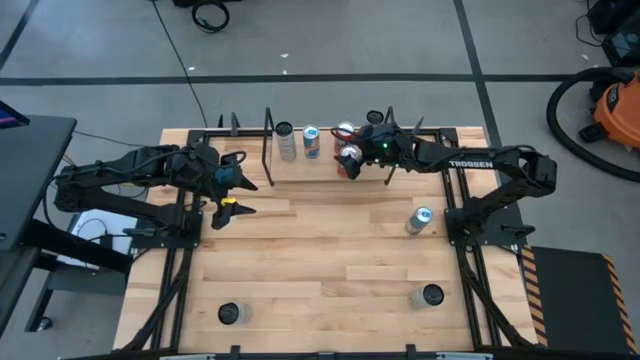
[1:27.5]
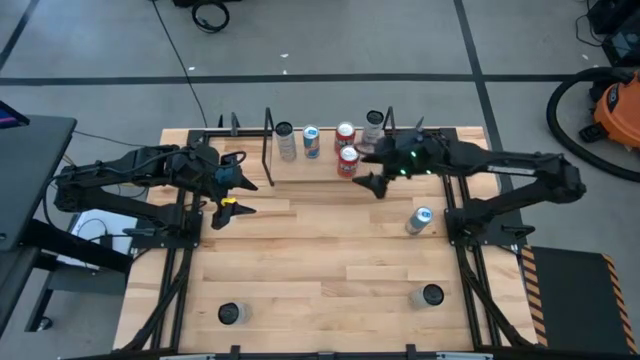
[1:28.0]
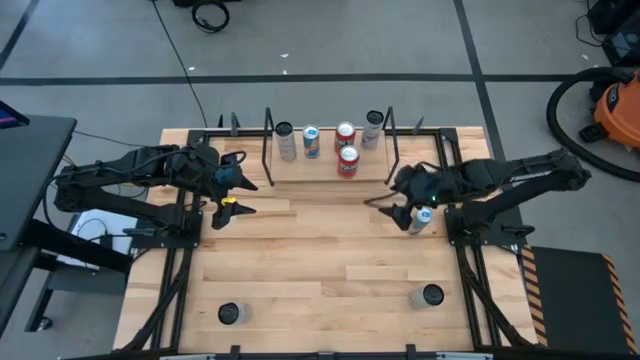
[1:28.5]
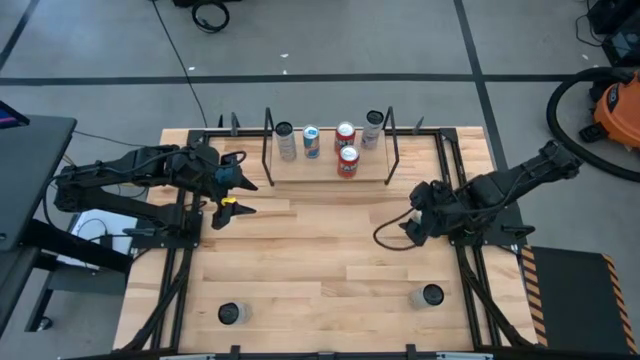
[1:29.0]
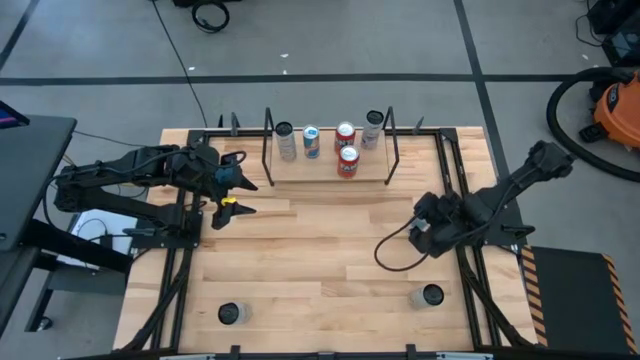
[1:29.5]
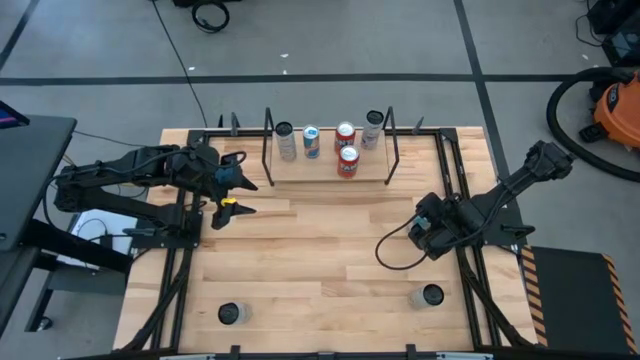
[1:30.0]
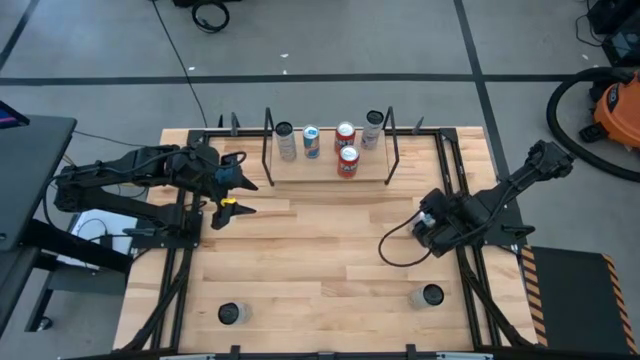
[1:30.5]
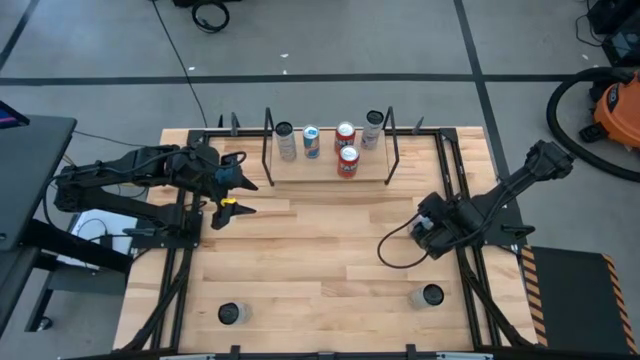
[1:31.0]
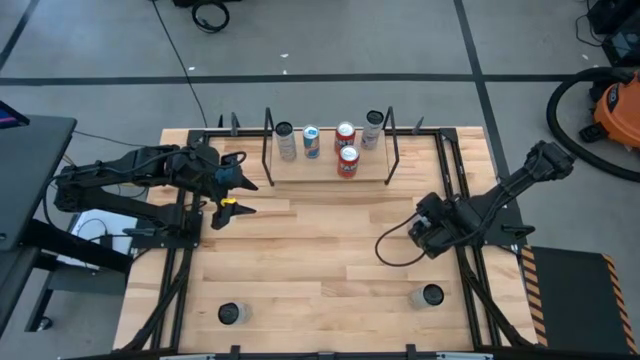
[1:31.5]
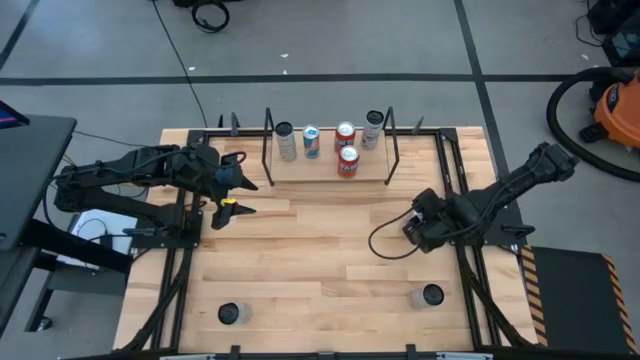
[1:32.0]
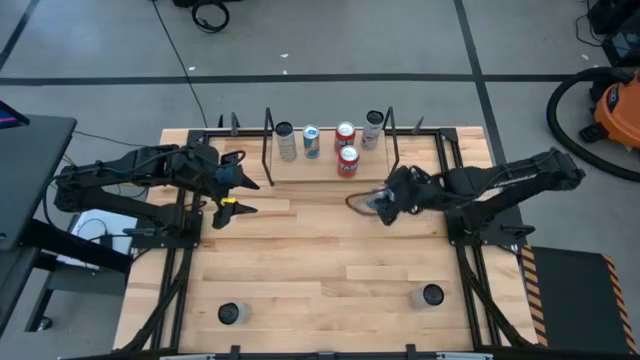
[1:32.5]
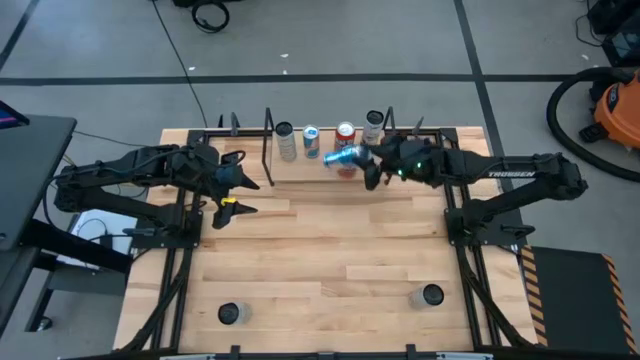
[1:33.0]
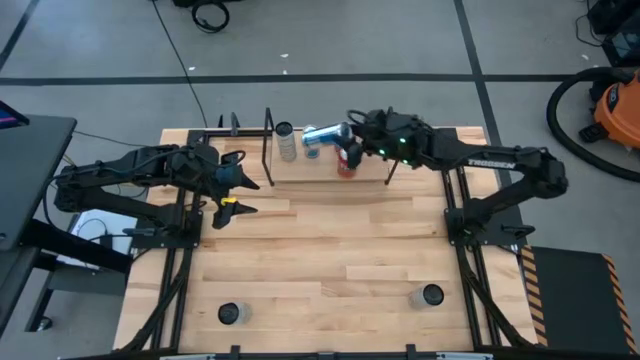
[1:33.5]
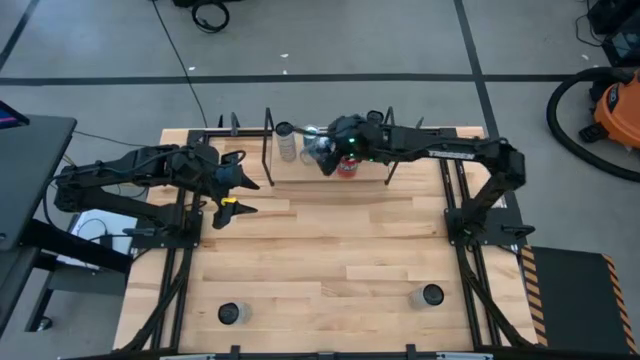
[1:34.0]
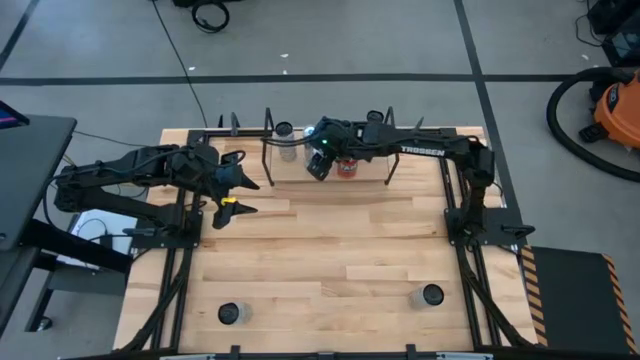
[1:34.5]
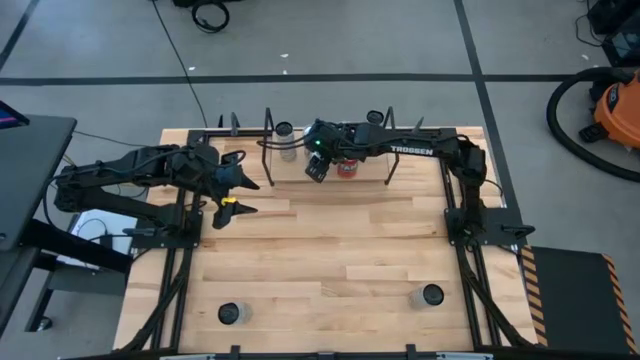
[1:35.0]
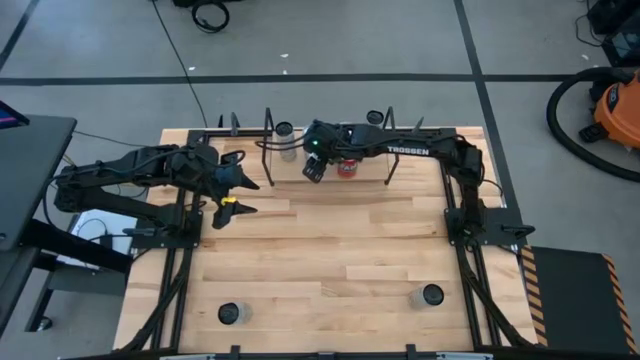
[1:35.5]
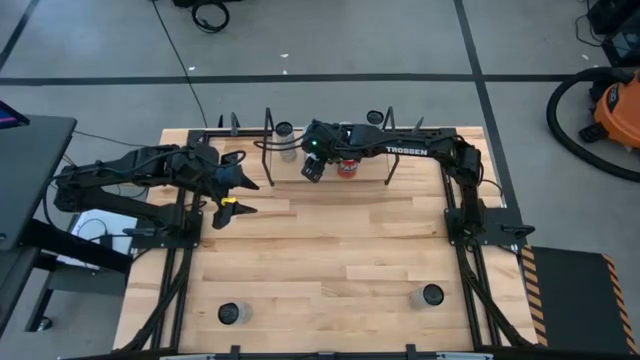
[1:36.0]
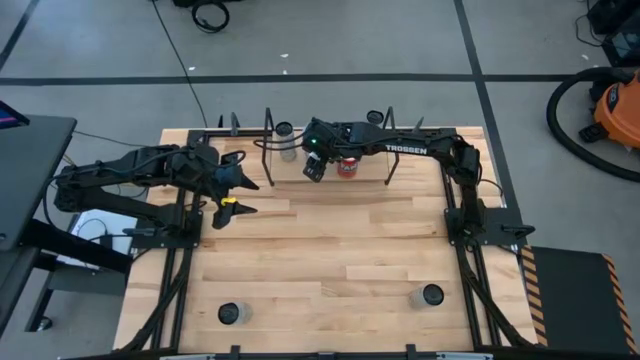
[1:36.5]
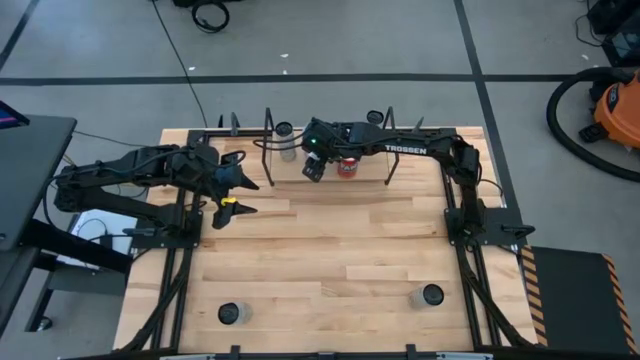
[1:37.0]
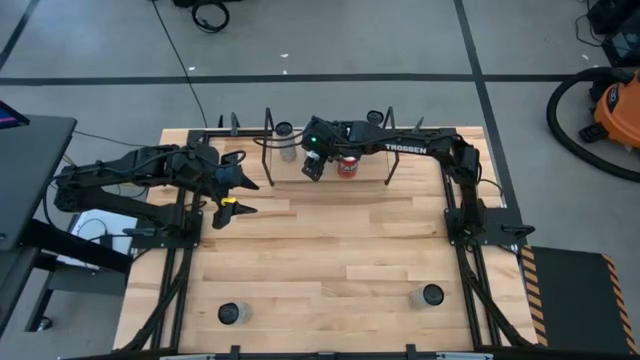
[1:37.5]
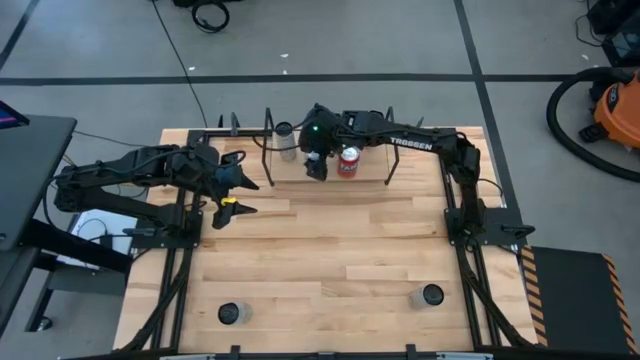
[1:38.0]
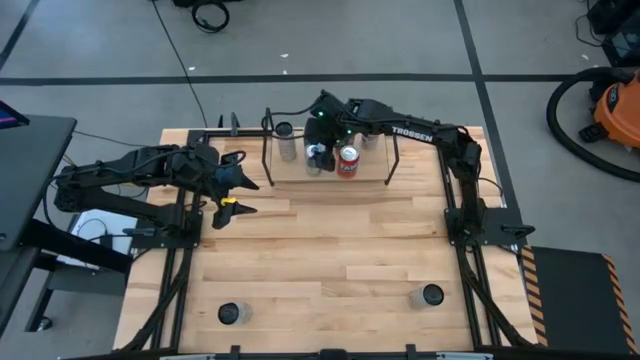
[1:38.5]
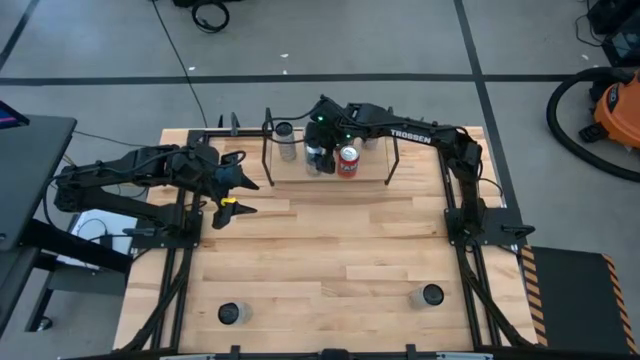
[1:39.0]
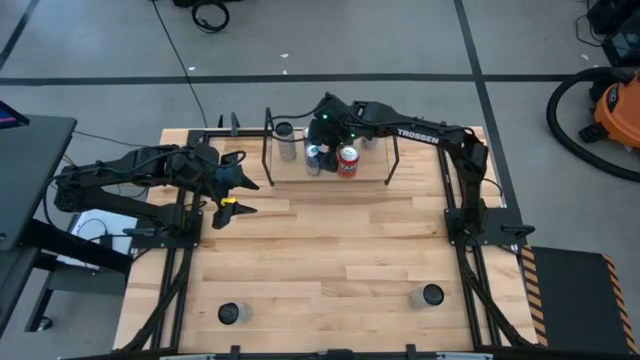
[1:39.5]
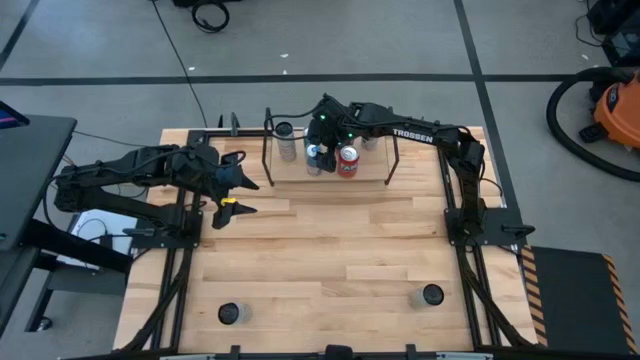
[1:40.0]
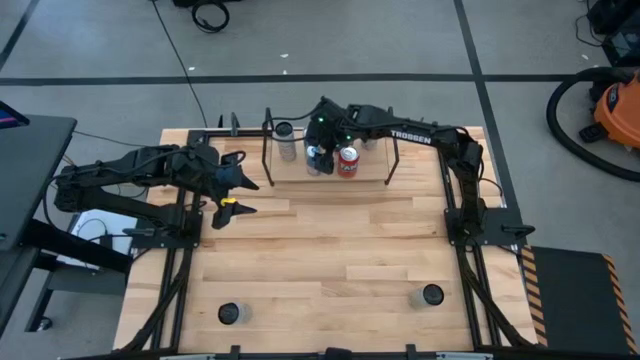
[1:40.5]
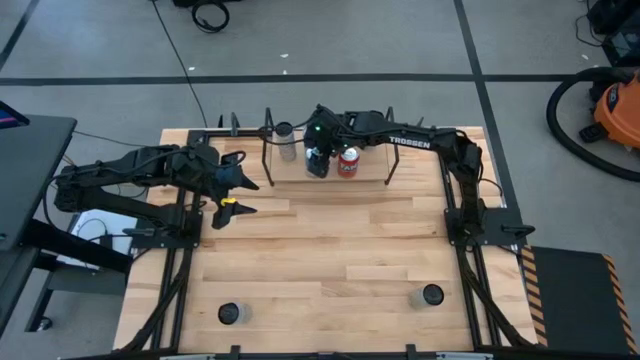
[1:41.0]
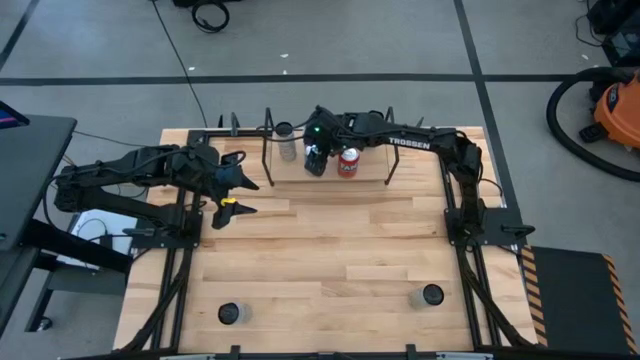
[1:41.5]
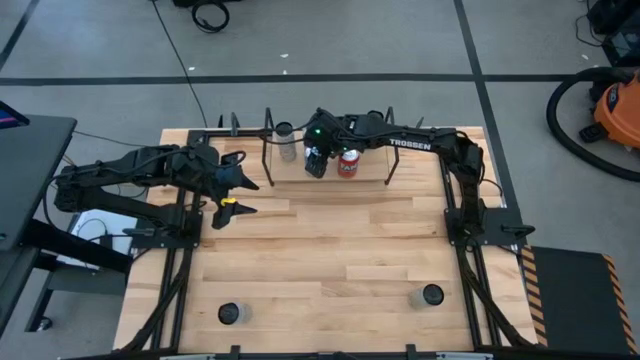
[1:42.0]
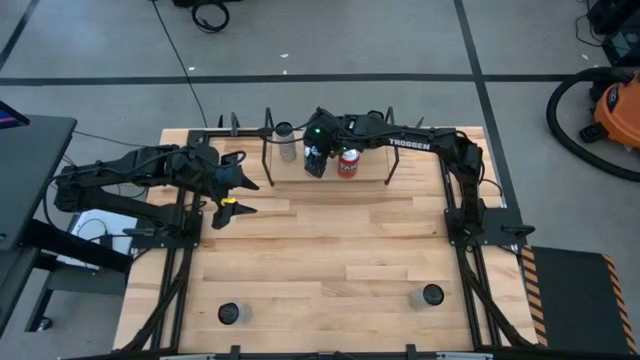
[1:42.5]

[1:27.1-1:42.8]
Task: Place canned beverage on shelf
Put the blue soda can on the shelf aligned with the other blue soda can

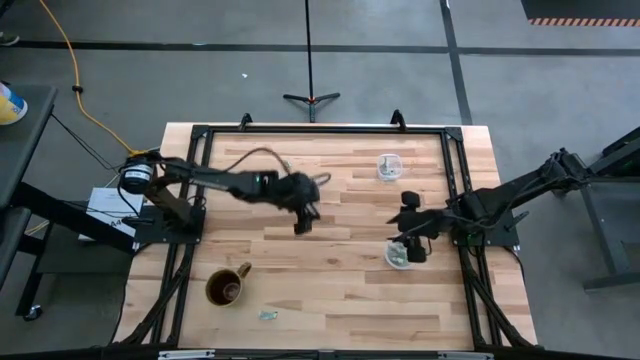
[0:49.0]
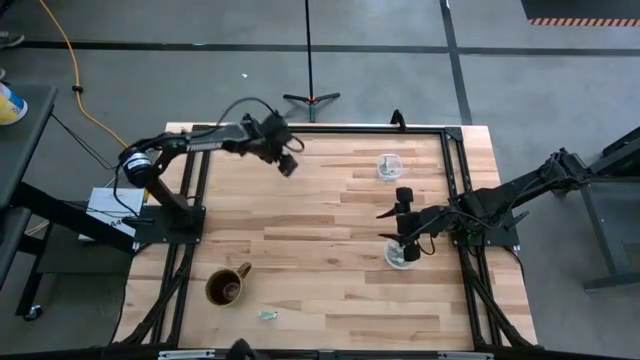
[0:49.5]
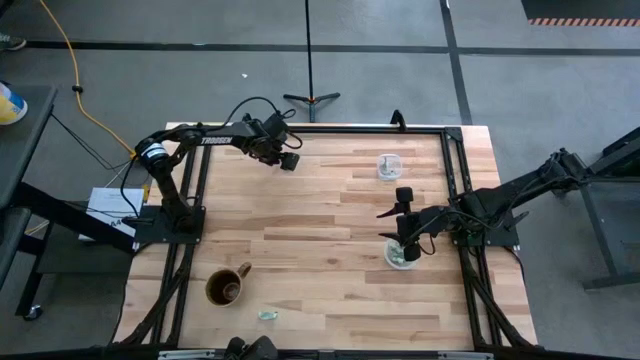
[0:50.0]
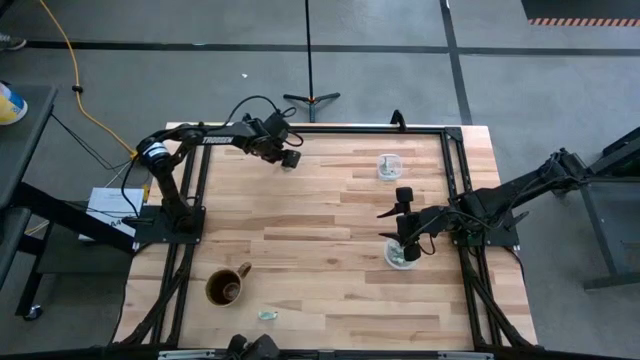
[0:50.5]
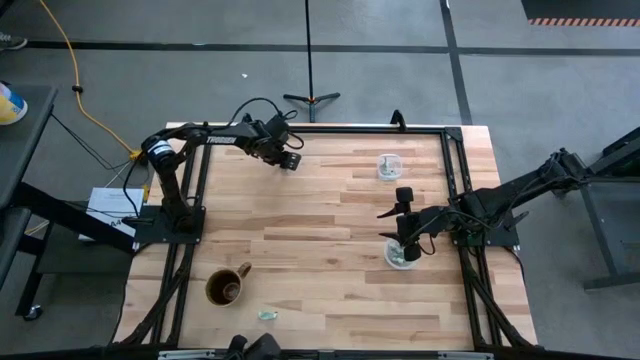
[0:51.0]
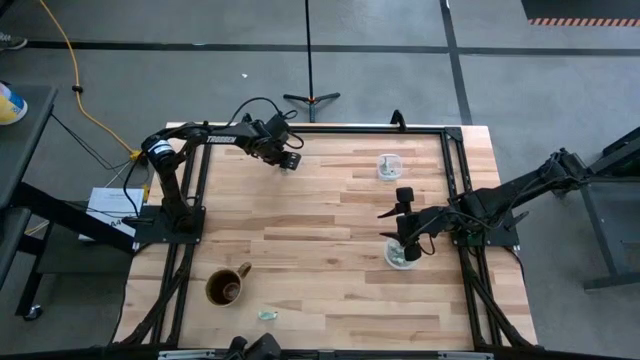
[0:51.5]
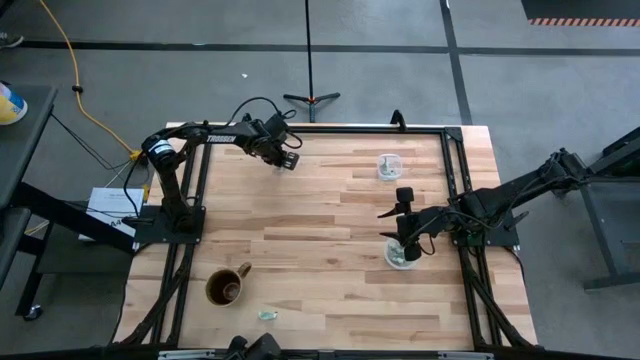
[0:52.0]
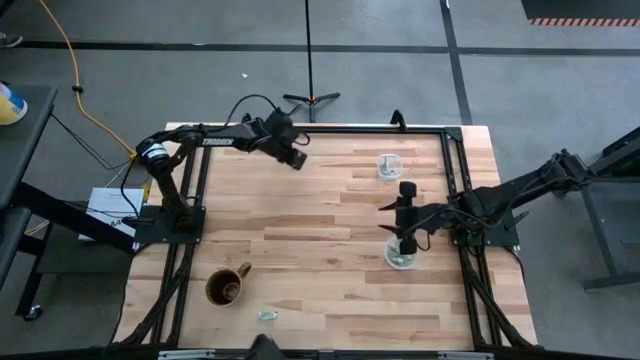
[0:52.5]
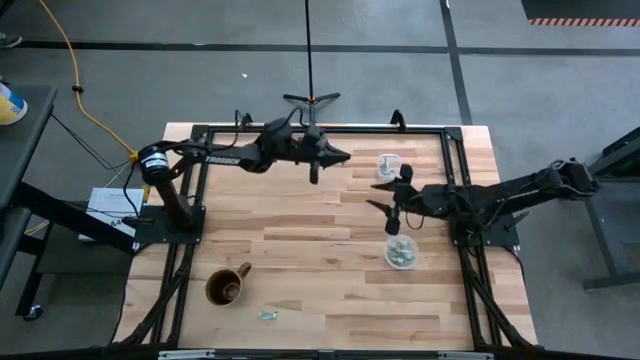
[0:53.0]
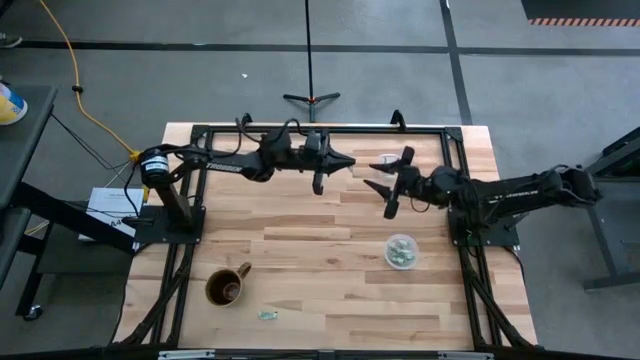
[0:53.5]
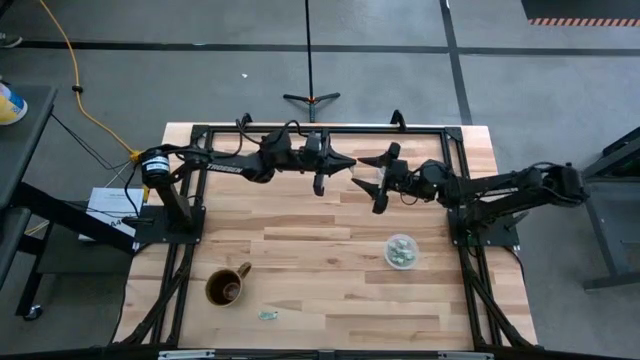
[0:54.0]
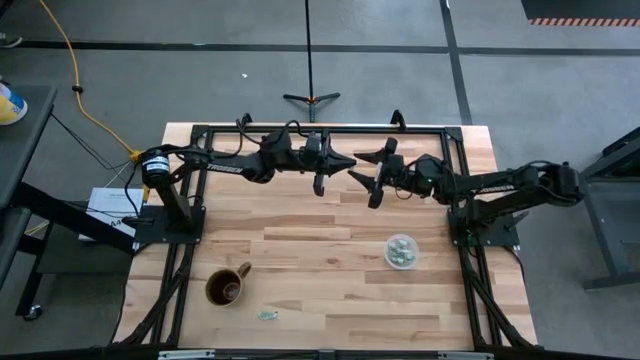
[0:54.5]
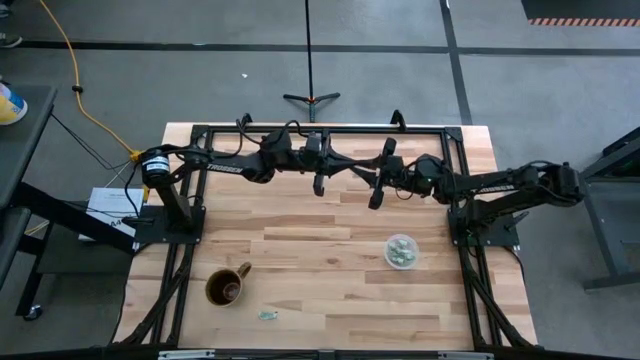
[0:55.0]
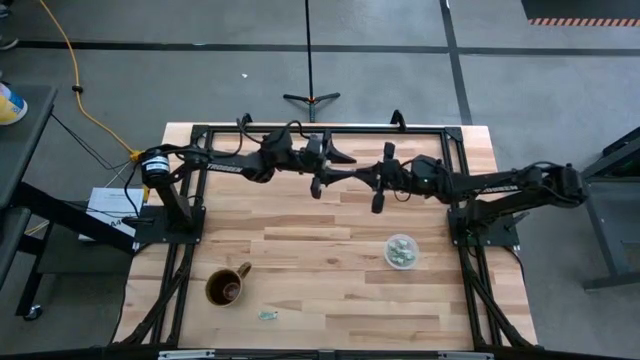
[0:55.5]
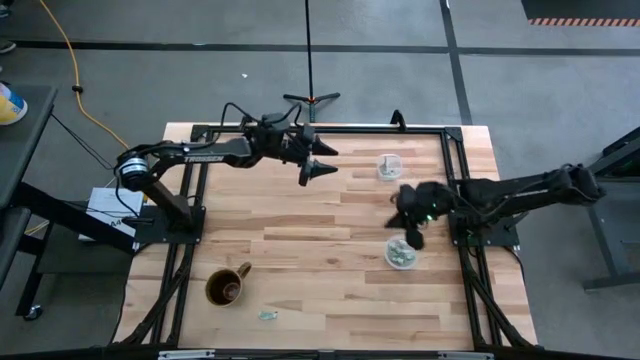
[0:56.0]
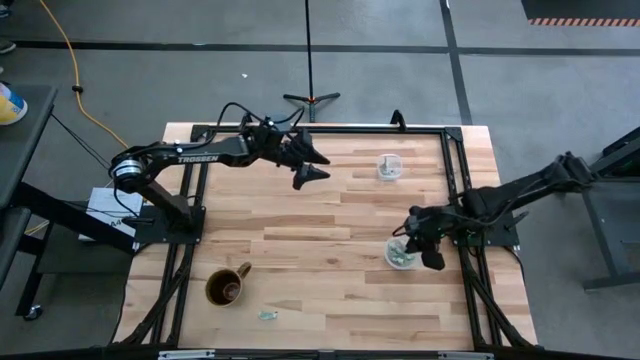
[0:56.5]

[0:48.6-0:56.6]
Task: Pick and place items into bin
Put the green stevia packet into the bottom transparent bin
